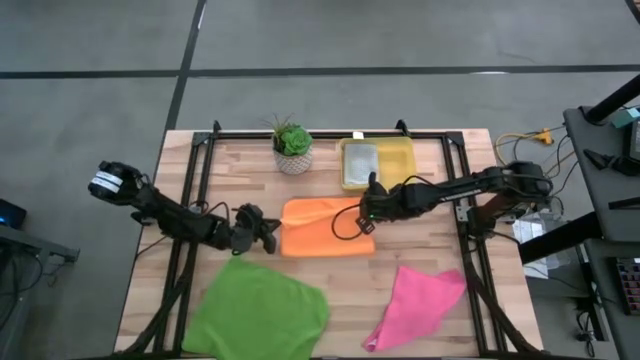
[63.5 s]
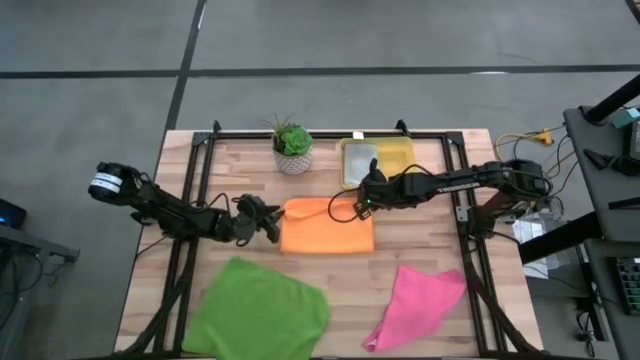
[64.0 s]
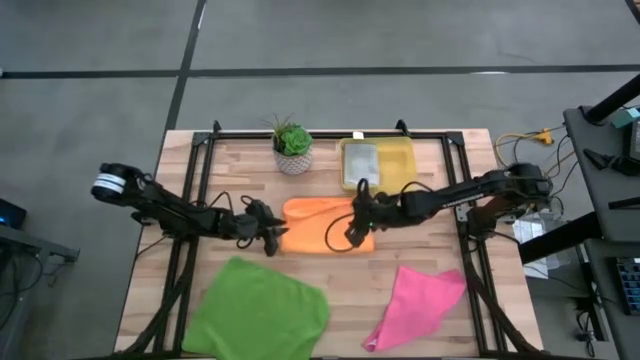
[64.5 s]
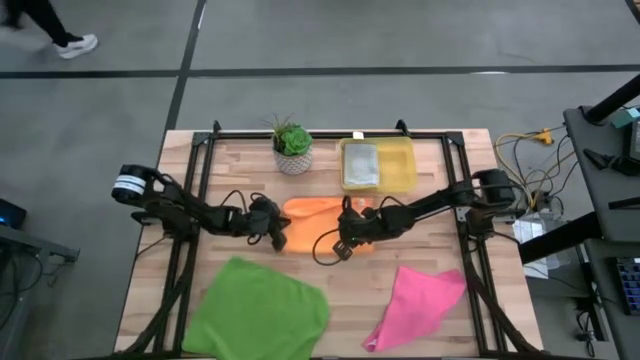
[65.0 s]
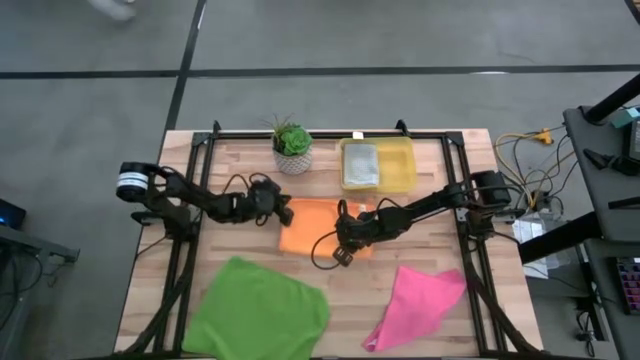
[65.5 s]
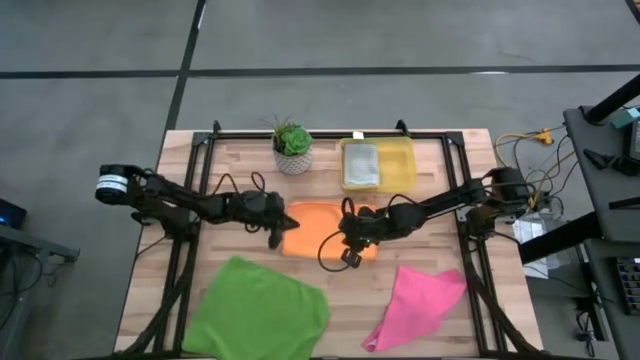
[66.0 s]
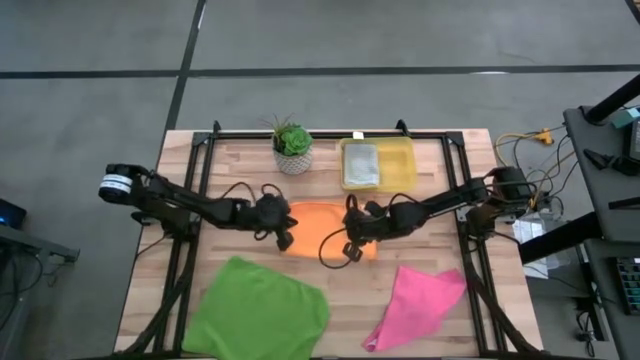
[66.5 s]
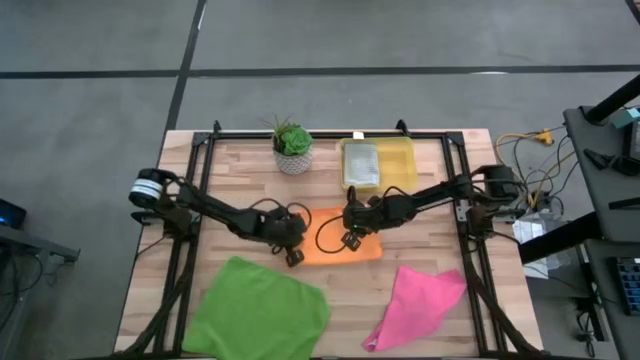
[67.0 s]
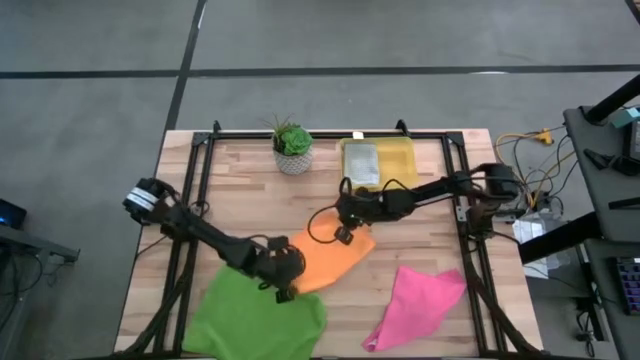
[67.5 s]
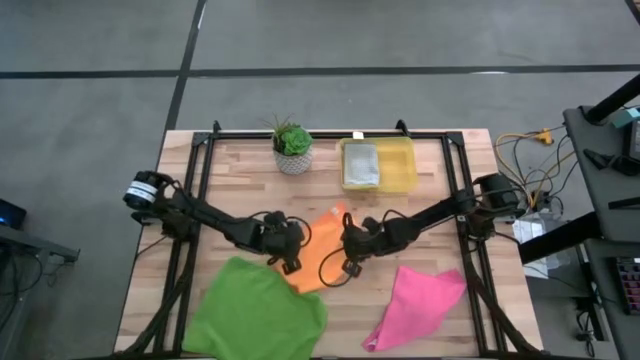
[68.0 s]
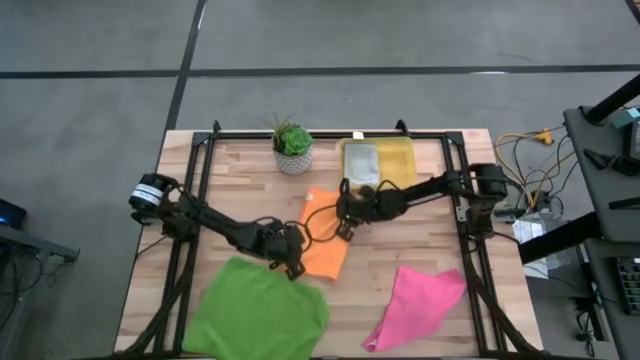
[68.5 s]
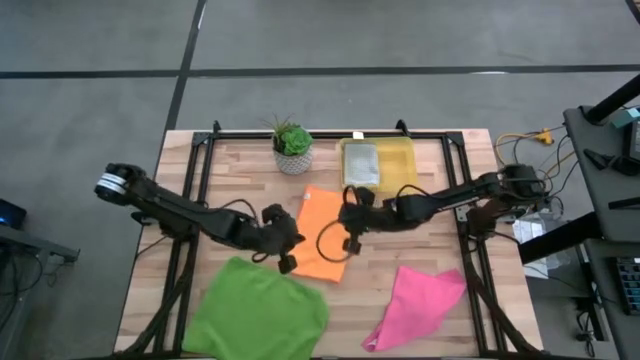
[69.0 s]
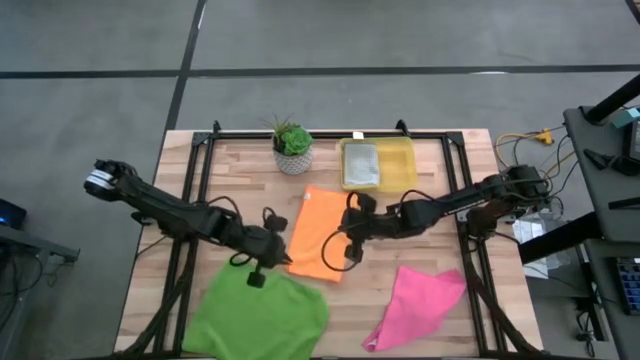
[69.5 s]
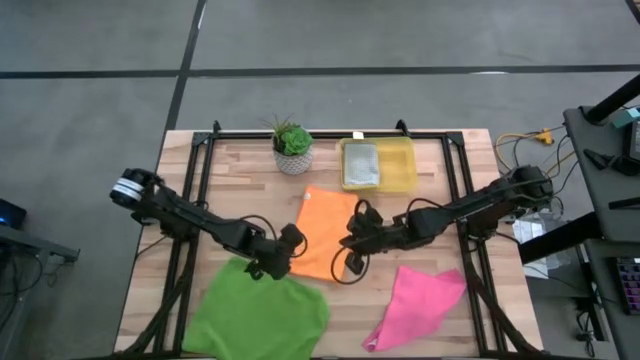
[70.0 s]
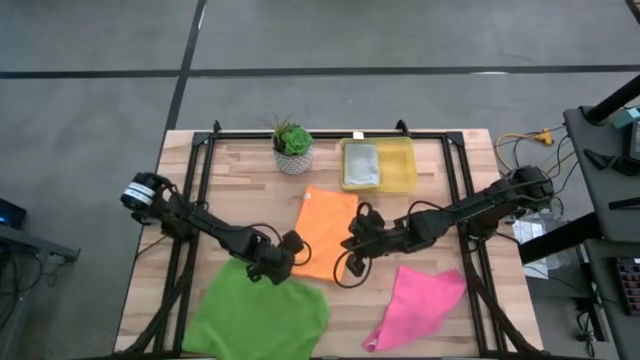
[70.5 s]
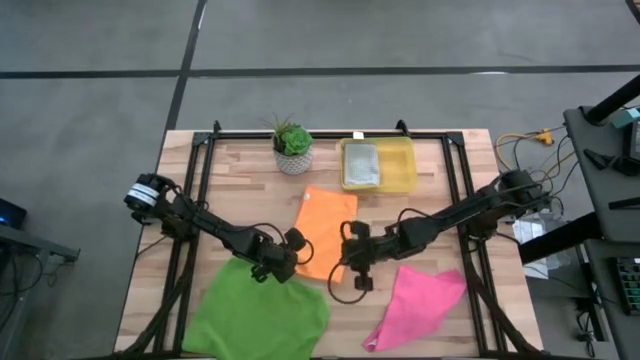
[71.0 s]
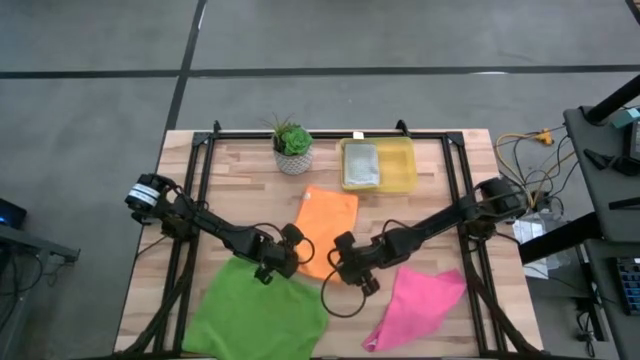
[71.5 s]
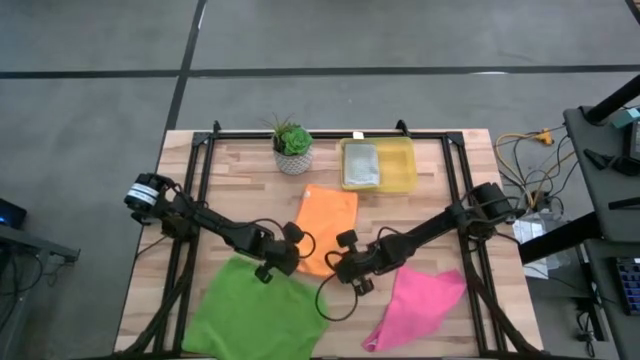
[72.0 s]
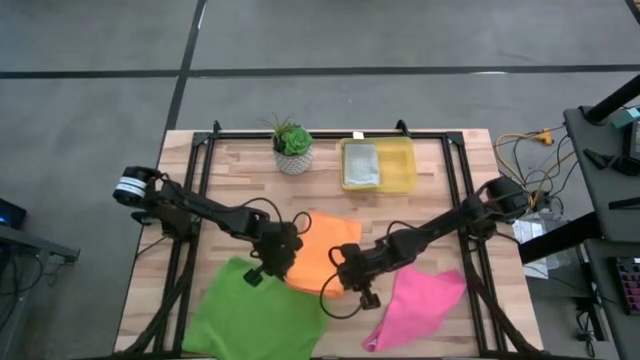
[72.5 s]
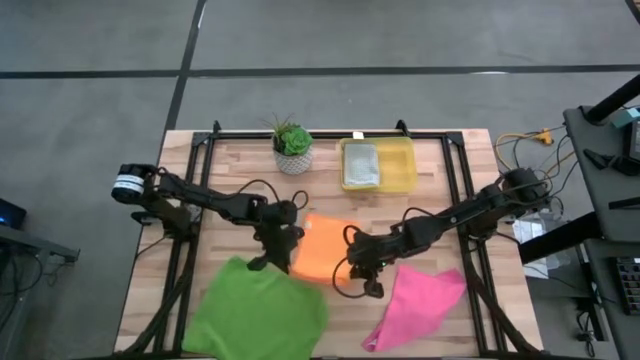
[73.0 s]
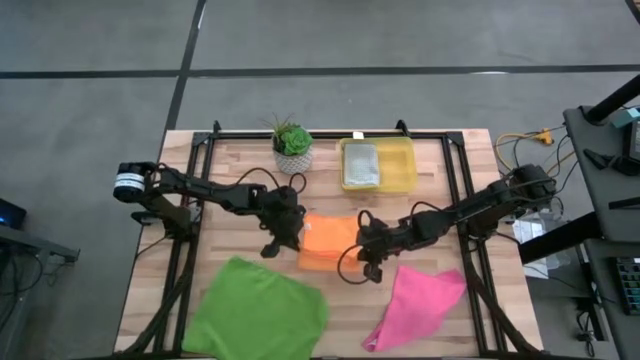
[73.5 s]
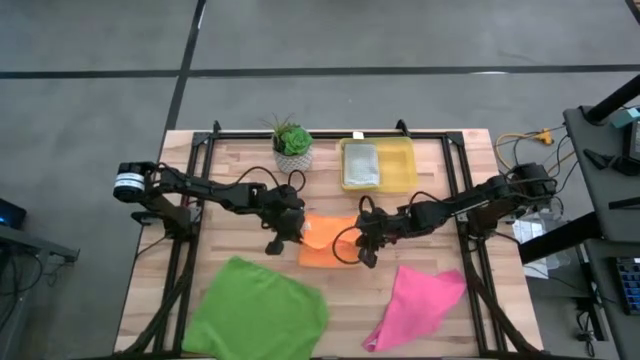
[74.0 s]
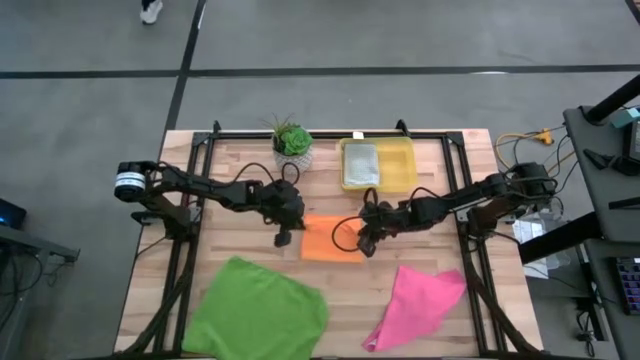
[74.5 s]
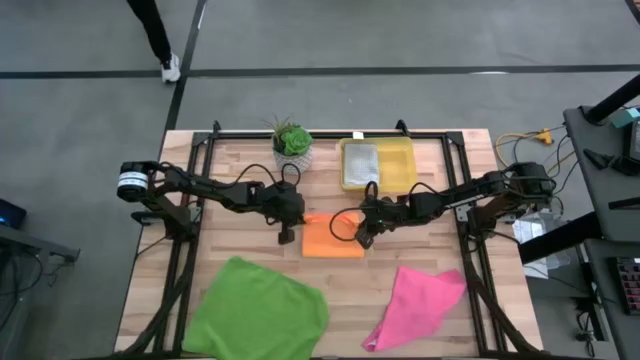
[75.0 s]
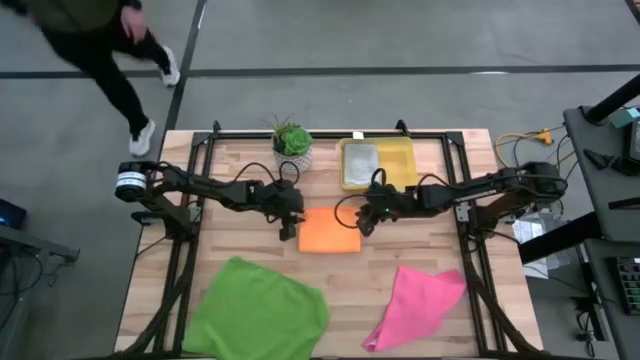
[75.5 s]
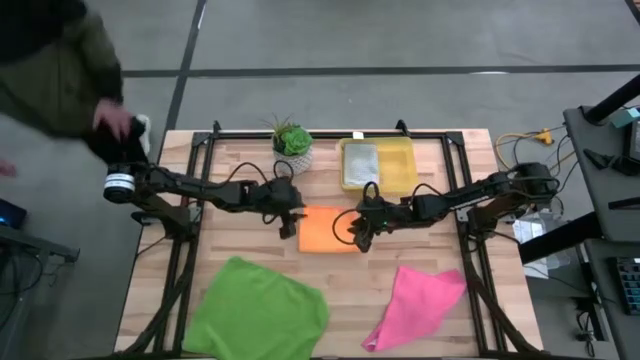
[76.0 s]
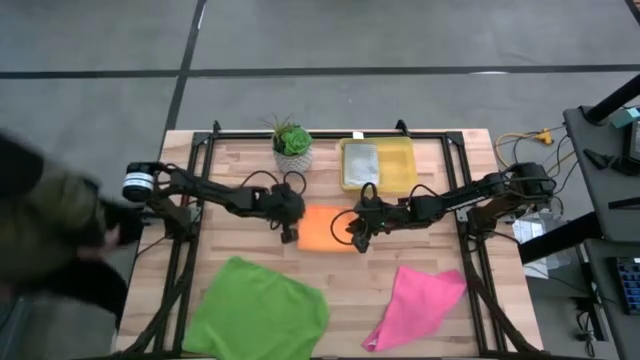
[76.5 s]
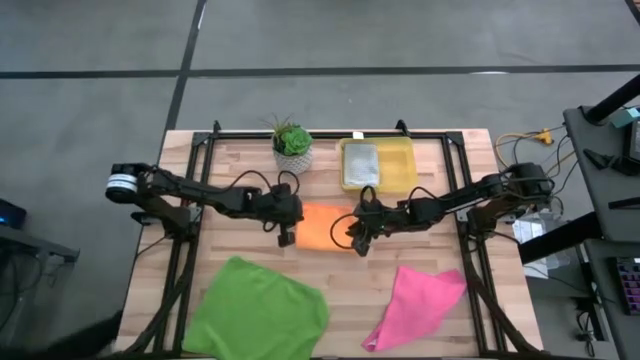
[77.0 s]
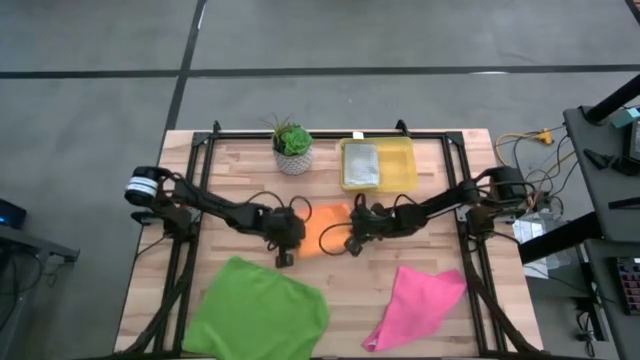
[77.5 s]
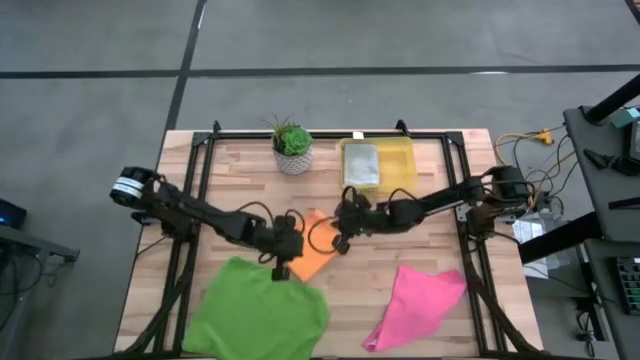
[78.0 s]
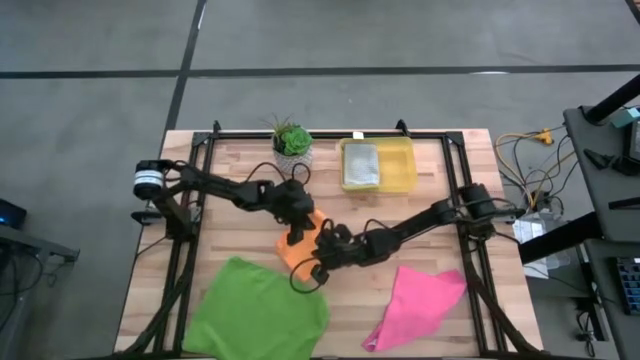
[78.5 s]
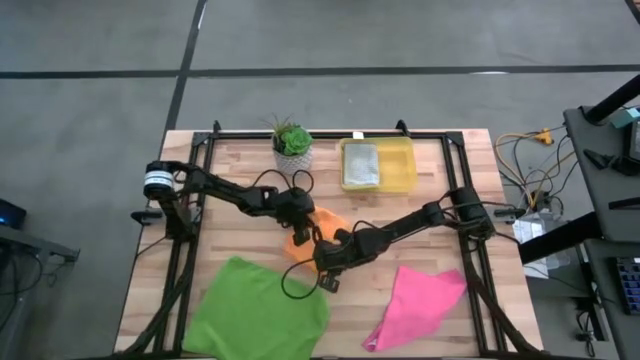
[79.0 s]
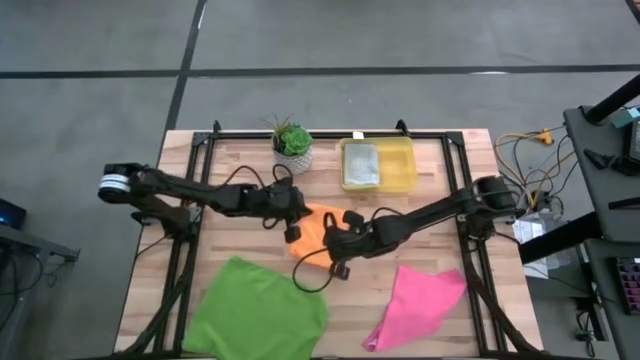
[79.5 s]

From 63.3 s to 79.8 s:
Task: Fold microfiber towels
Fold the orange microfiber cloth

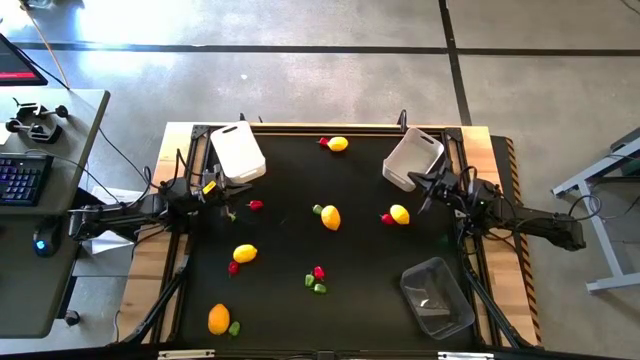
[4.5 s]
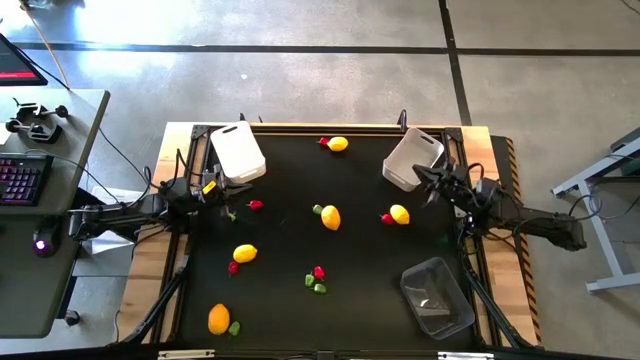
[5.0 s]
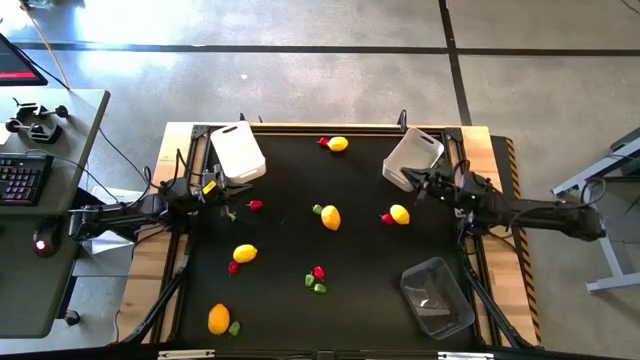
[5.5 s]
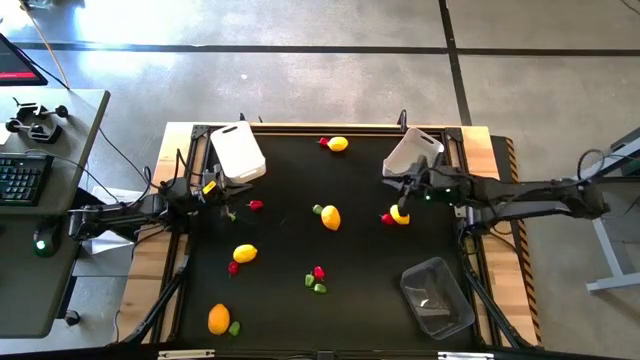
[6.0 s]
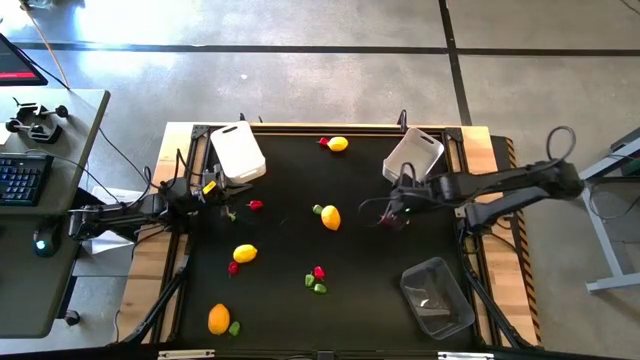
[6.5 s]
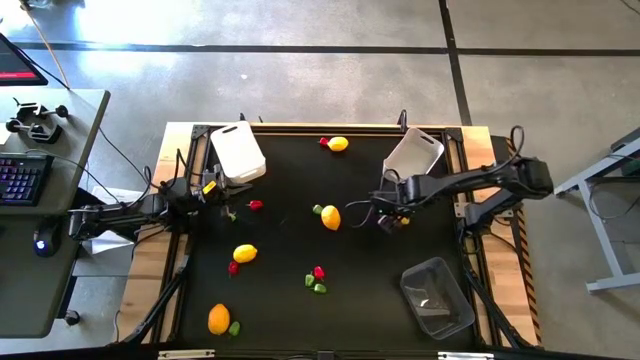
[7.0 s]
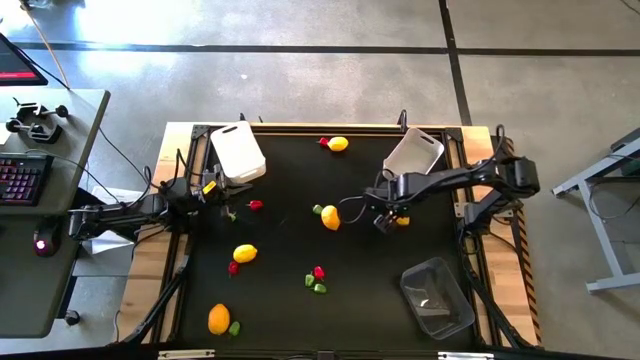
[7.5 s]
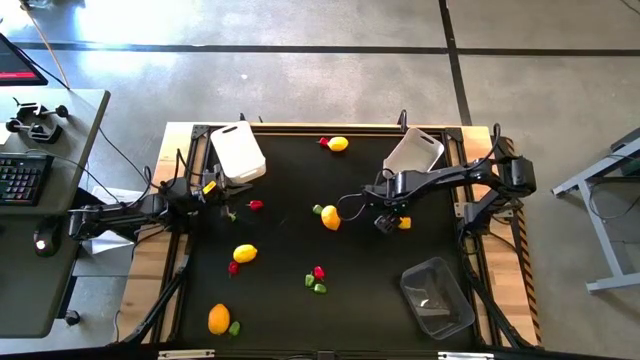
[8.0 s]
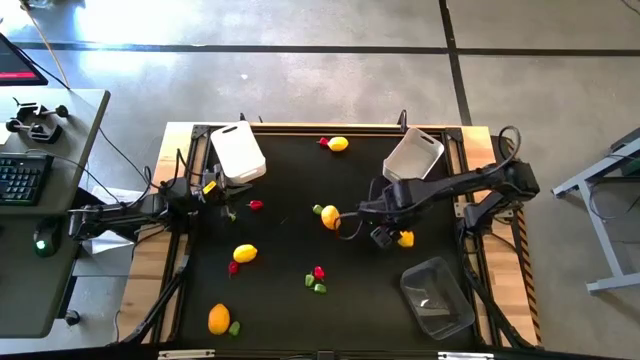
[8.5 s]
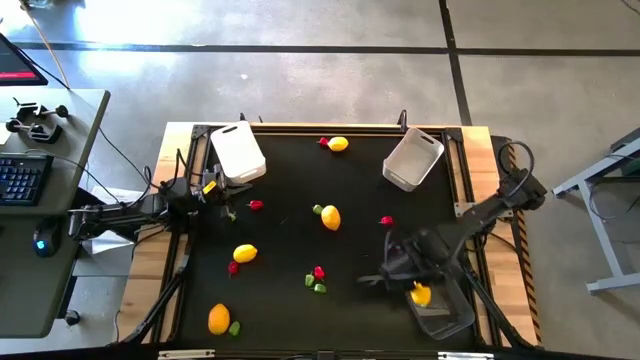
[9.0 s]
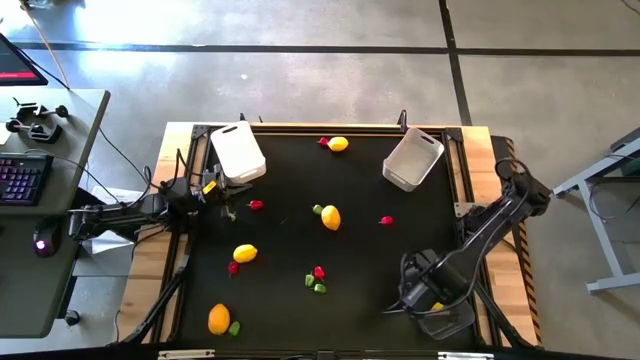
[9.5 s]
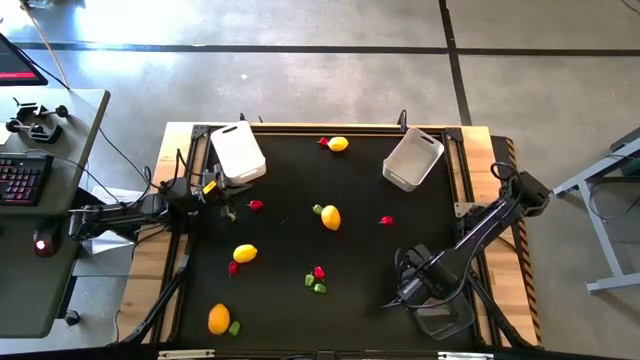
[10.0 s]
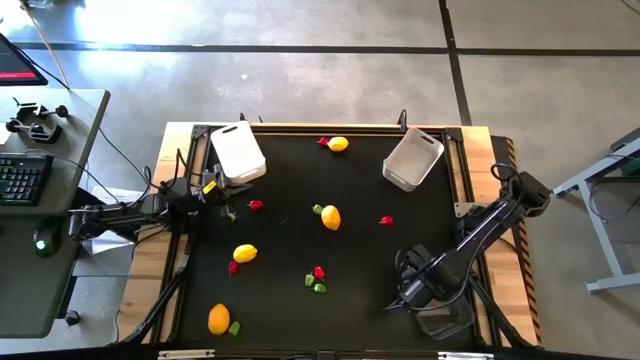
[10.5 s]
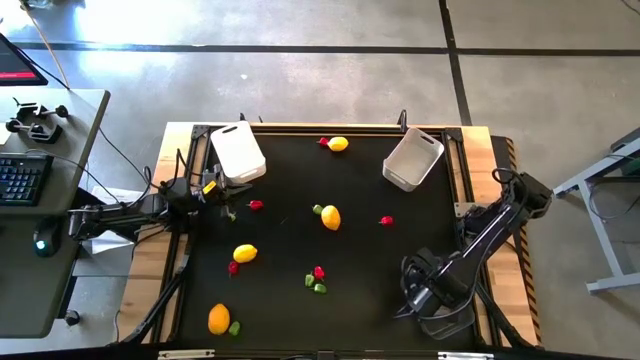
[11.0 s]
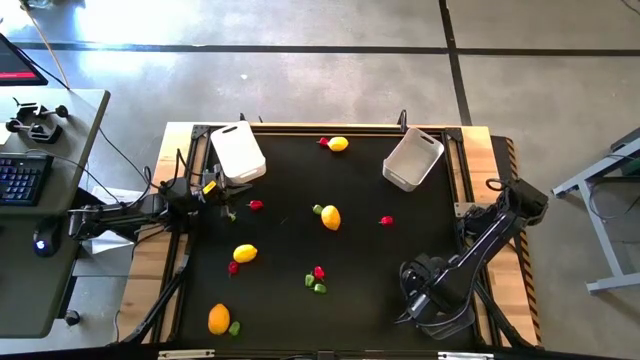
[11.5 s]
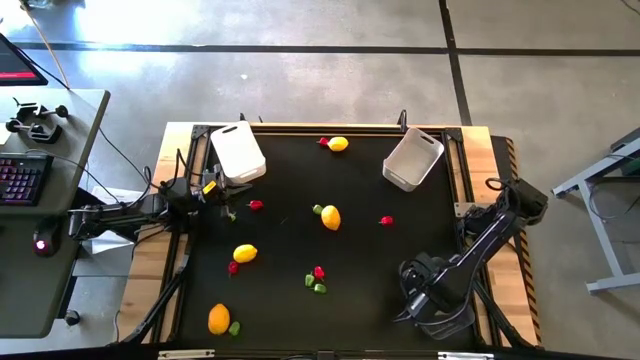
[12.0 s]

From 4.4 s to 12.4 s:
Task: Sort produce into baskets
Put the yellow lemon into the transparent bin
